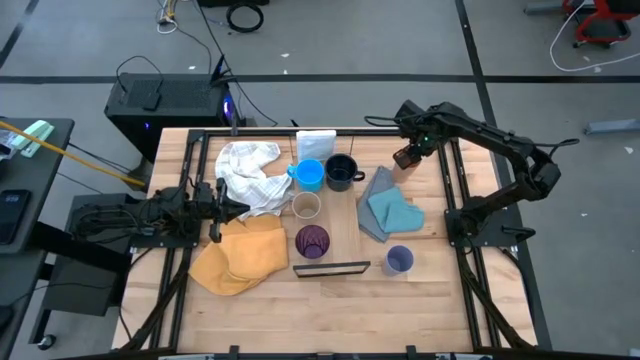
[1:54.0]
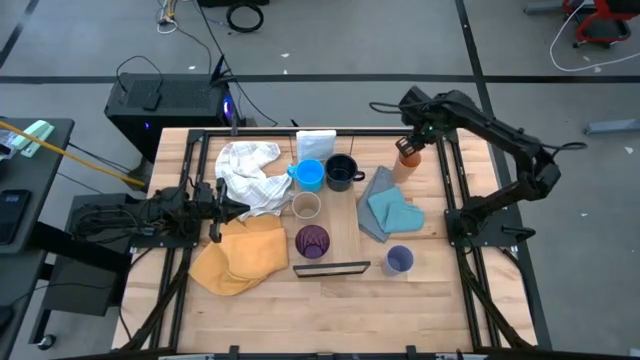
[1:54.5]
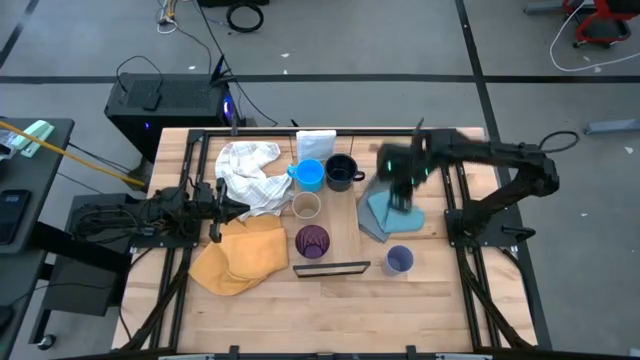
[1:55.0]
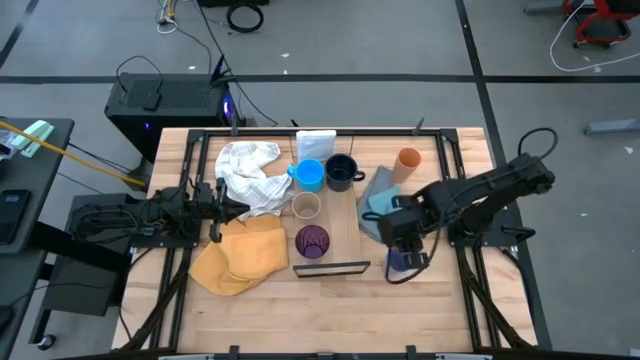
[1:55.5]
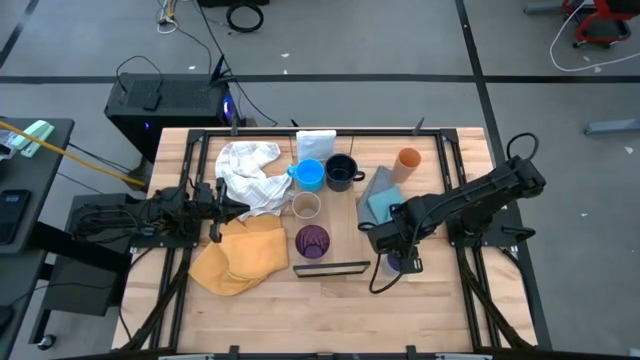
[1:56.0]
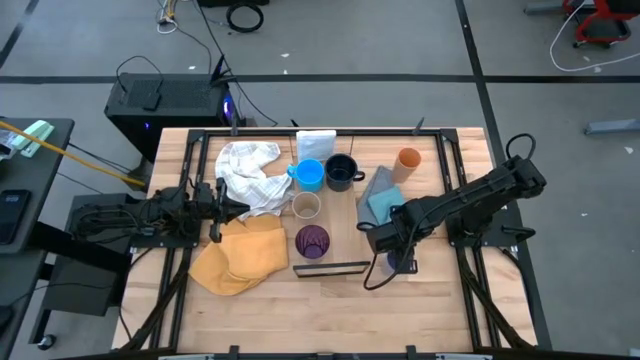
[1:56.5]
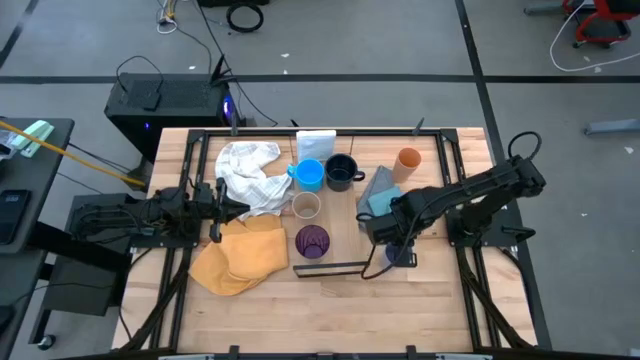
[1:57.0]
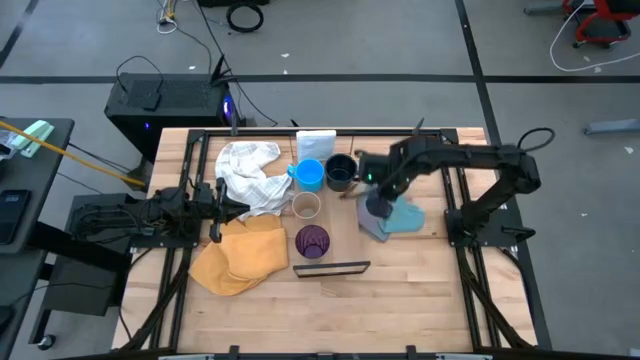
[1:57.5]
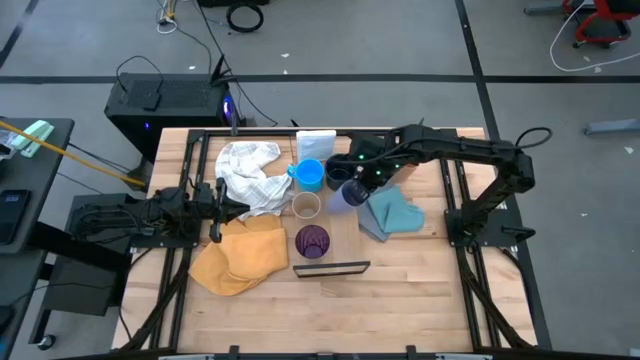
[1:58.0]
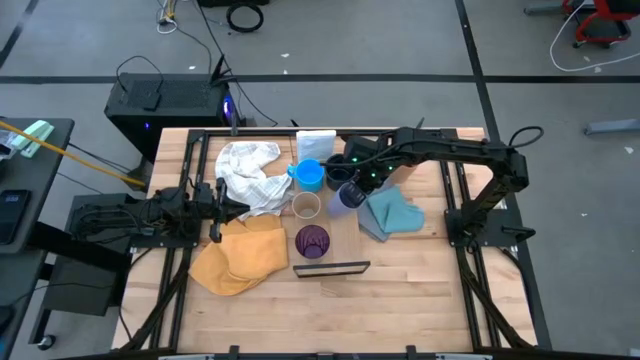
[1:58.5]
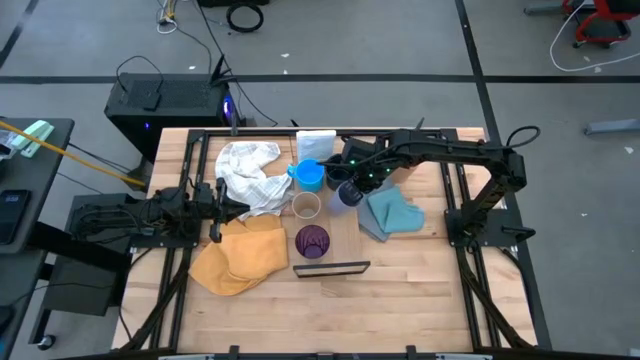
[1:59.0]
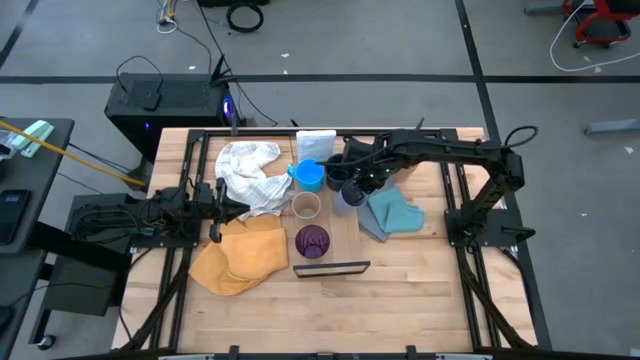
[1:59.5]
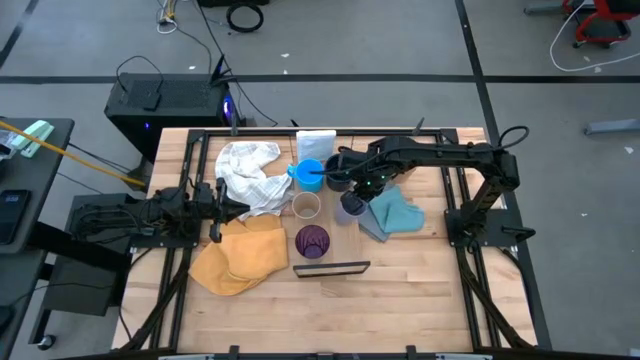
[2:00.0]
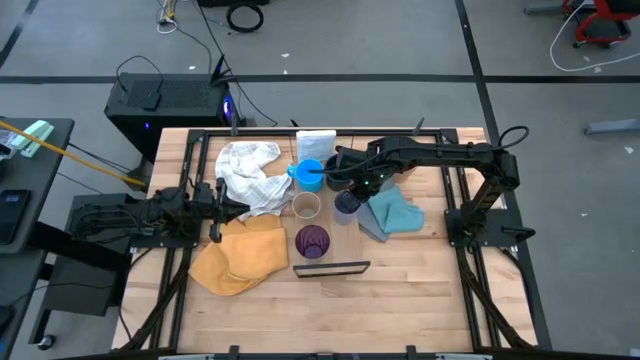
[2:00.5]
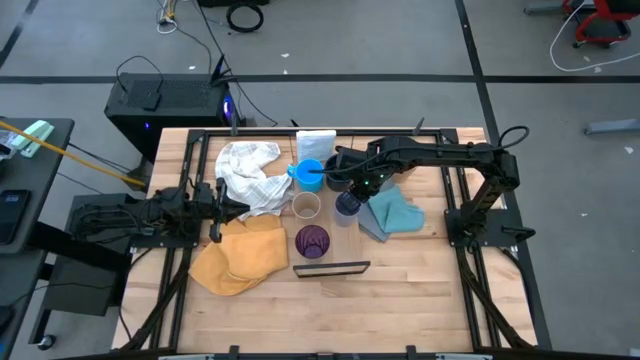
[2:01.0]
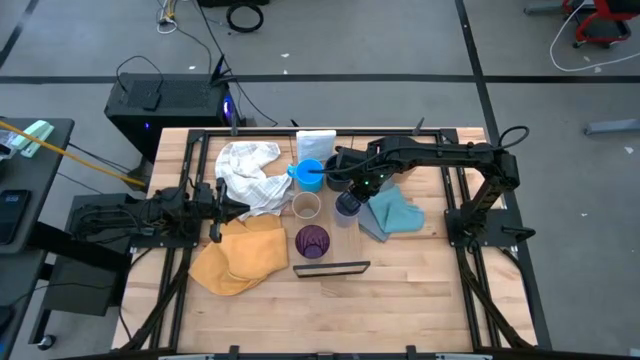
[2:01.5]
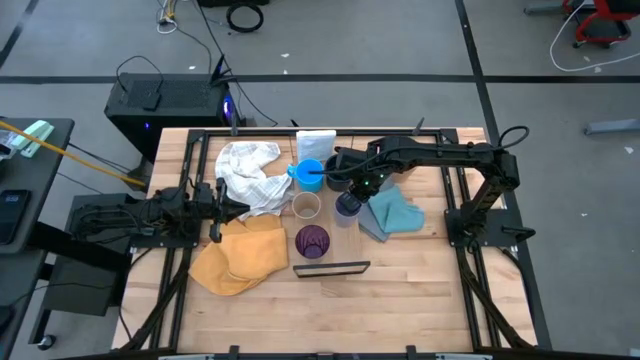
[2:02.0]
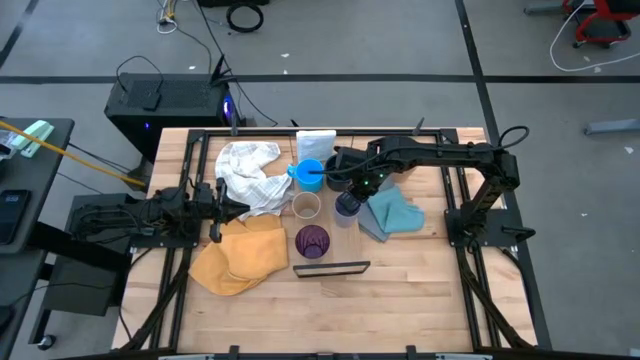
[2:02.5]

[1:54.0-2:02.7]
Task: Stack small to large cups/mugs on shelf
Put the purple cup on the shelf

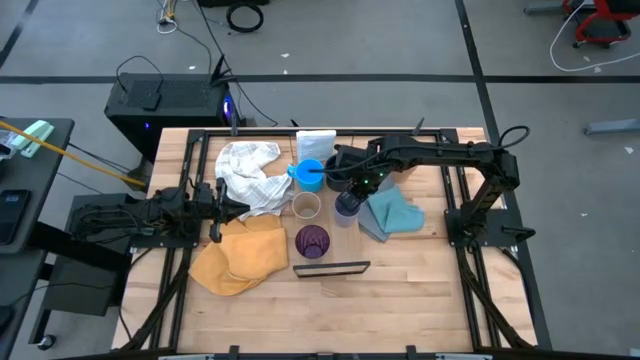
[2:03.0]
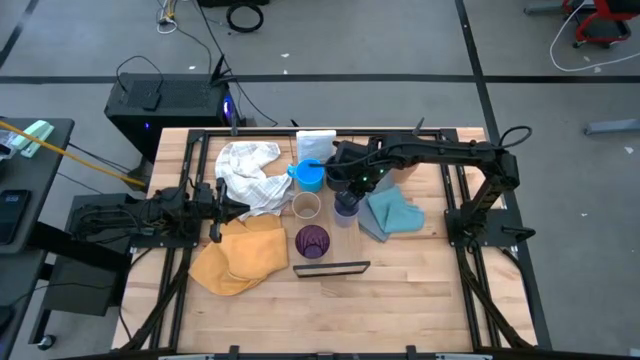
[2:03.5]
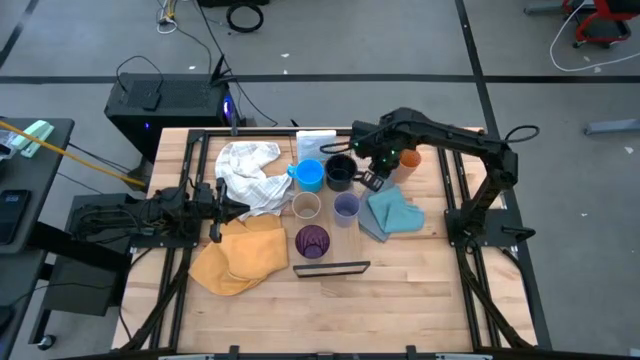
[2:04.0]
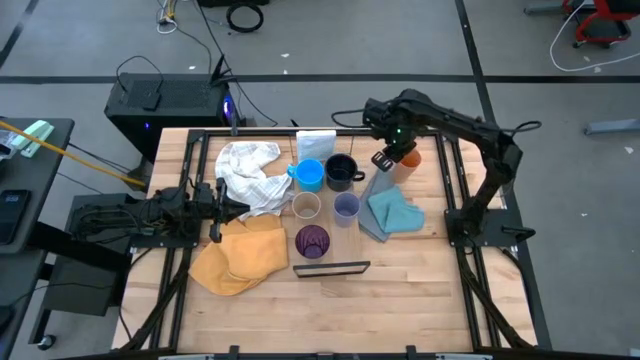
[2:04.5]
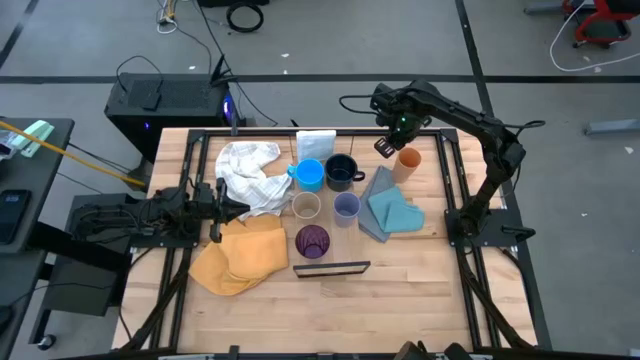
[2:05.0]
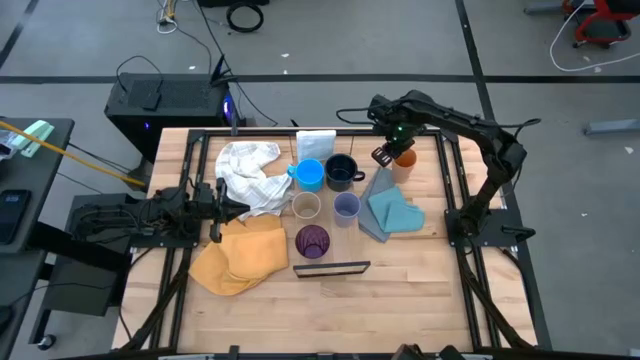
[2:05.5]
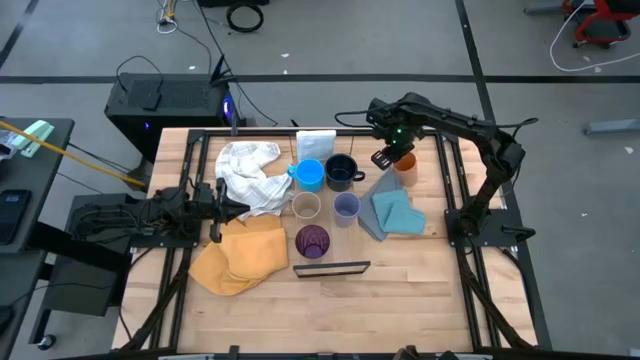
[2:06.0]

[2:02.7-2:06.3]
Put the orange cup on the shelf

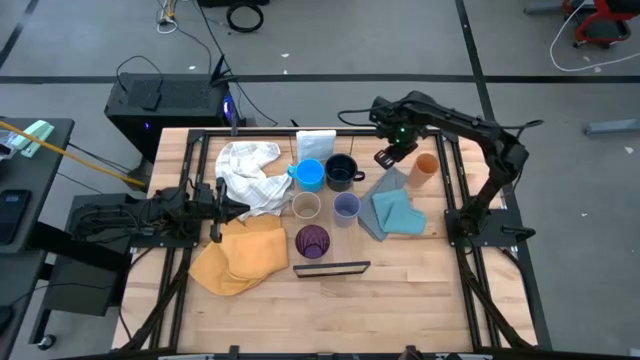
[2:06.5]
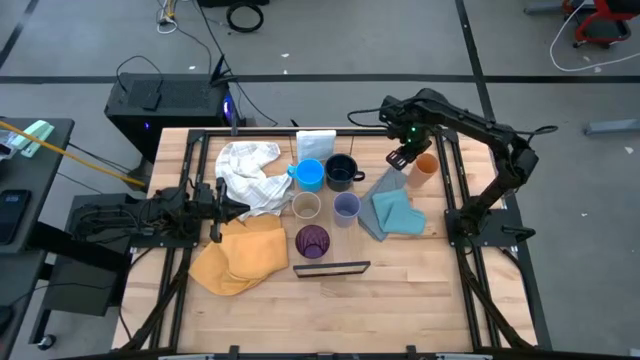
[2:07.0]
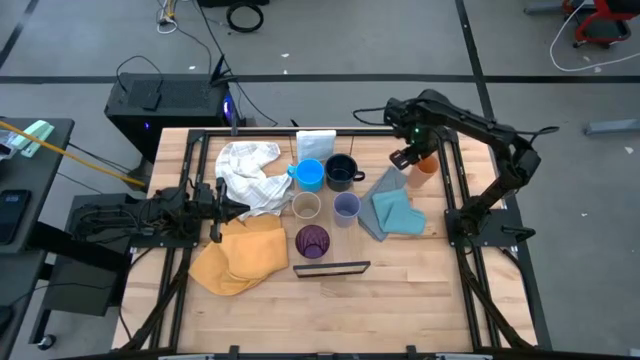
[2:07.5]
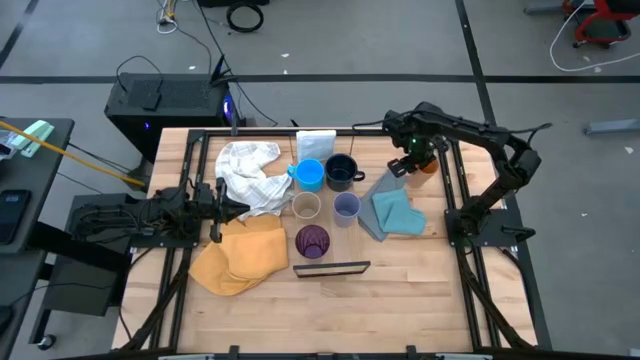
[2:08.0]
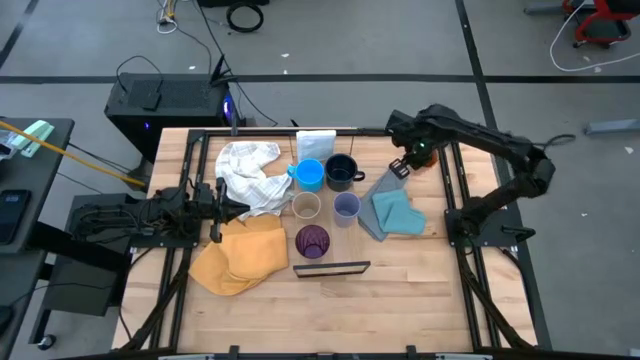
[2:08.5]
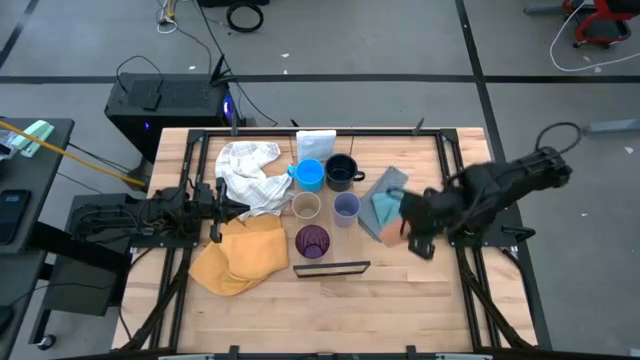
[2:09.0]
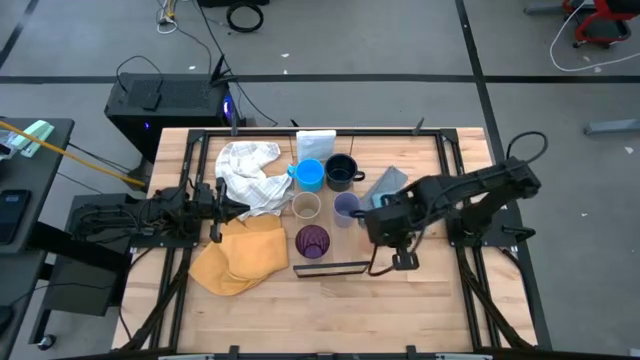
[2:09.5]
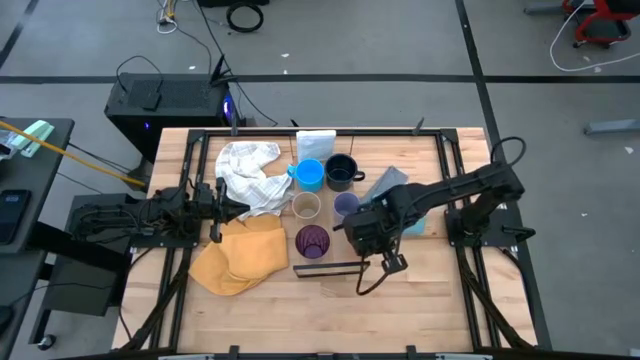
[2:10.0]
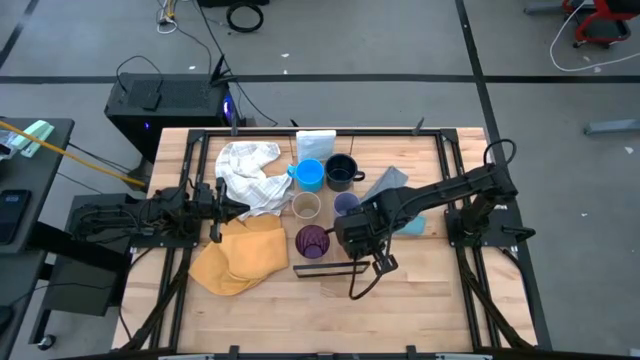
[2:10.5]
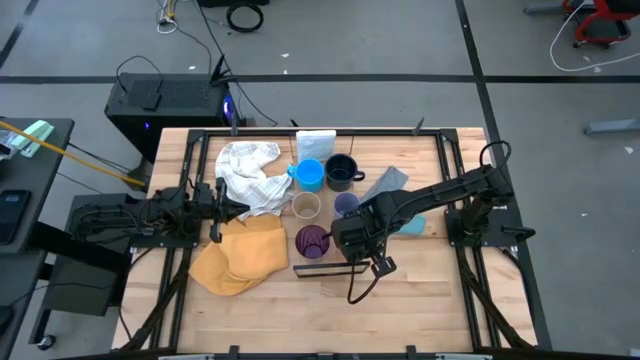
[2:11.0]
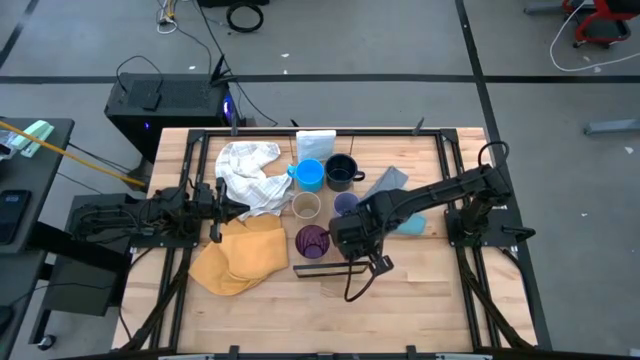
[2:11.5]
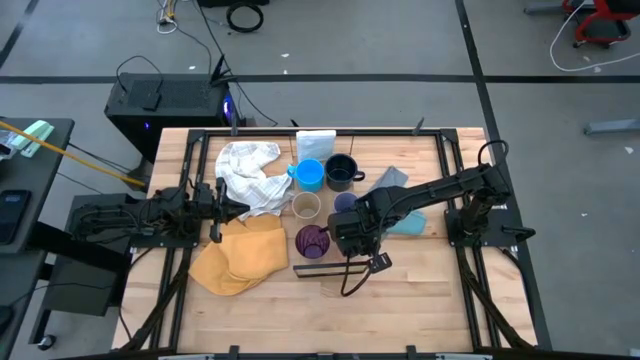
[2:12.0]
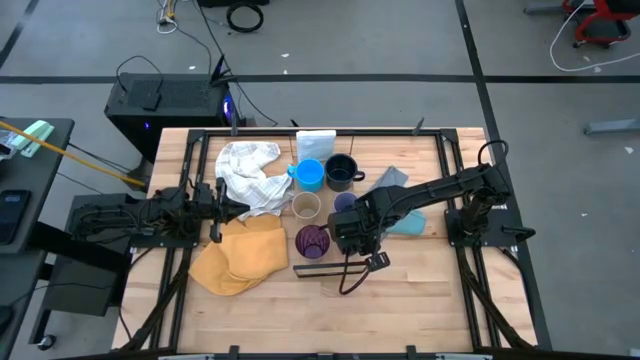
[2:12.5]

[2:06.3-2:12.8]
Put the orange cup on the shelf
